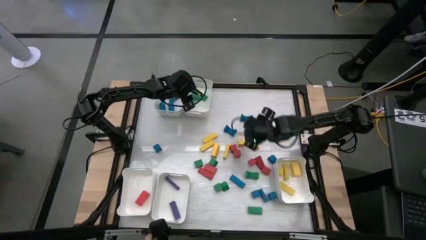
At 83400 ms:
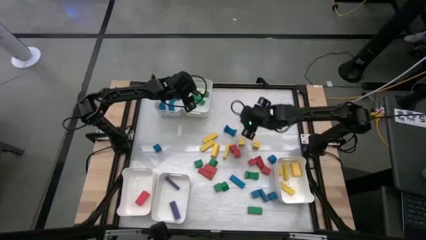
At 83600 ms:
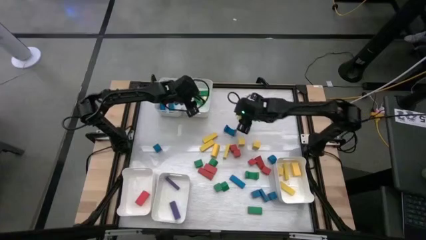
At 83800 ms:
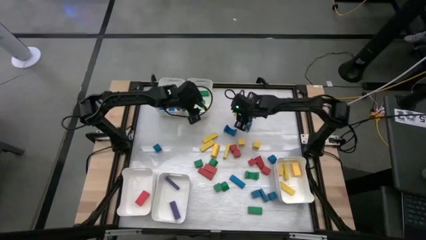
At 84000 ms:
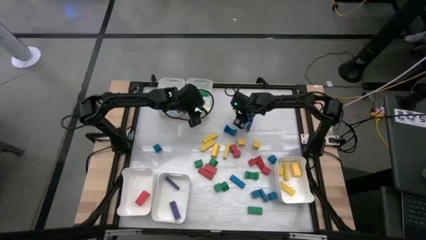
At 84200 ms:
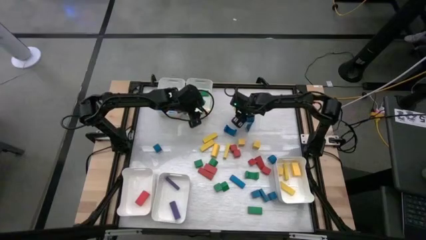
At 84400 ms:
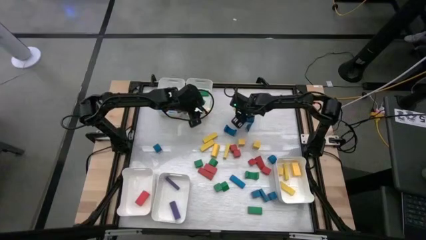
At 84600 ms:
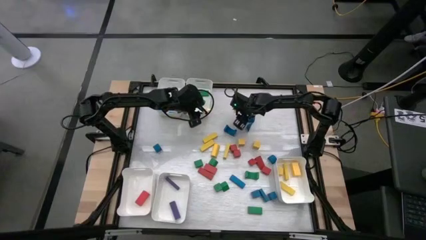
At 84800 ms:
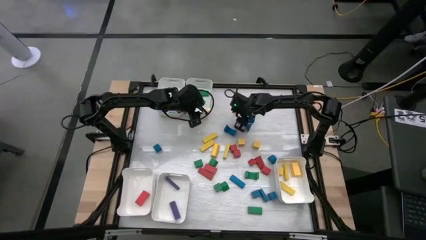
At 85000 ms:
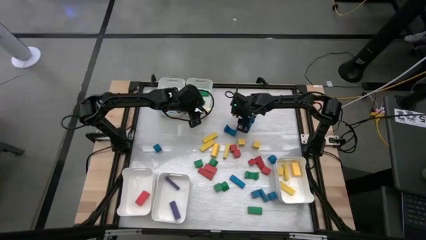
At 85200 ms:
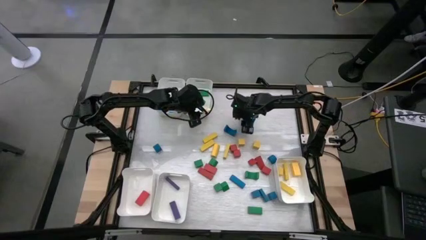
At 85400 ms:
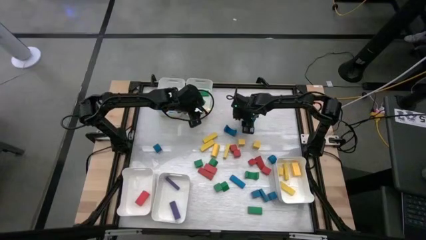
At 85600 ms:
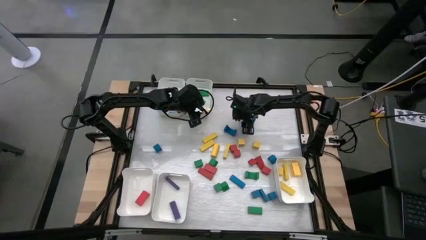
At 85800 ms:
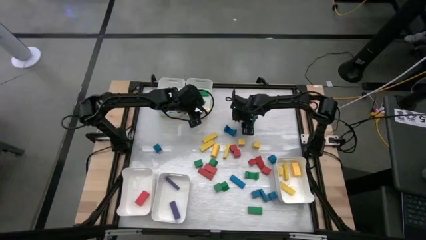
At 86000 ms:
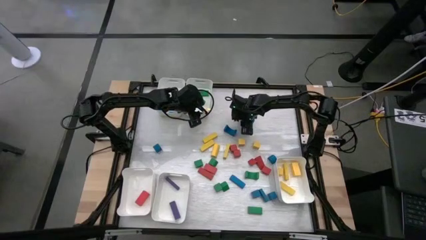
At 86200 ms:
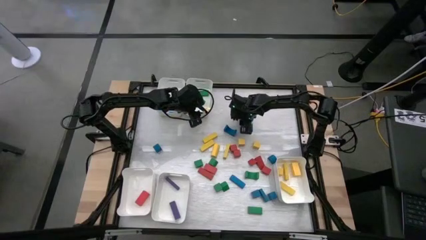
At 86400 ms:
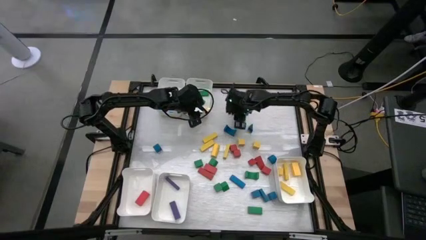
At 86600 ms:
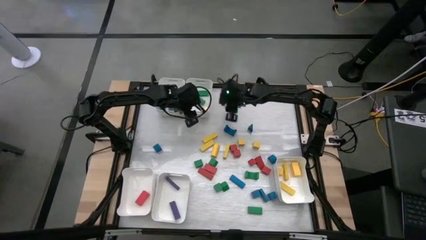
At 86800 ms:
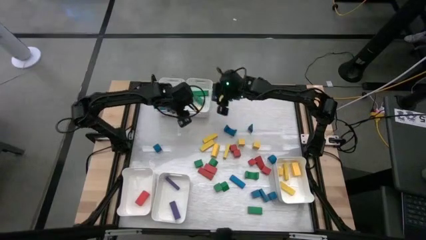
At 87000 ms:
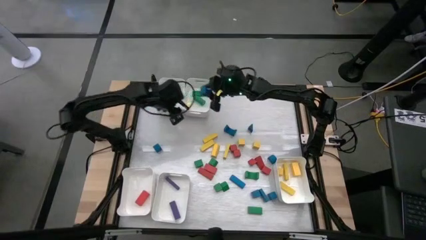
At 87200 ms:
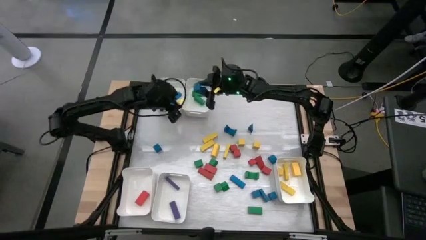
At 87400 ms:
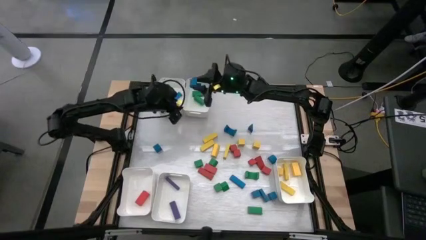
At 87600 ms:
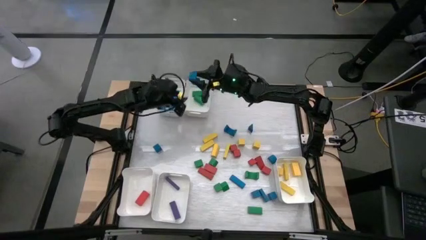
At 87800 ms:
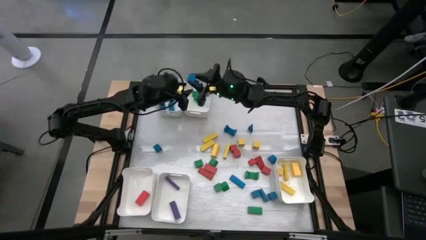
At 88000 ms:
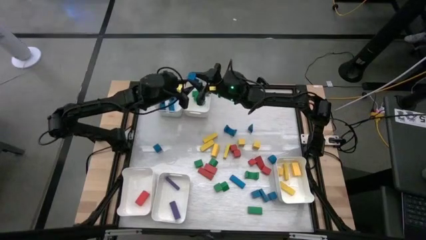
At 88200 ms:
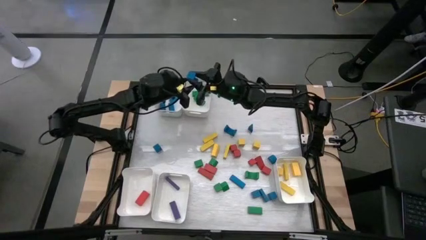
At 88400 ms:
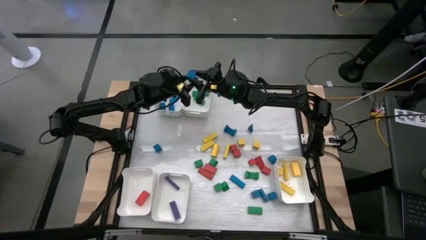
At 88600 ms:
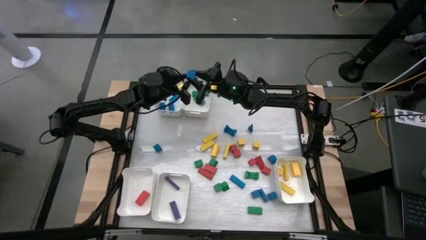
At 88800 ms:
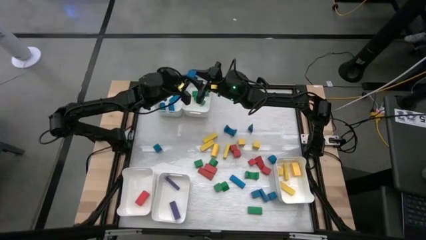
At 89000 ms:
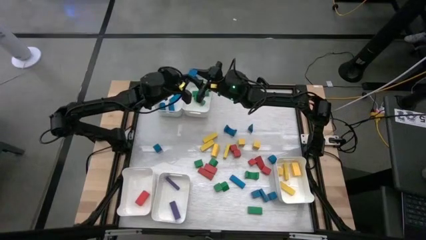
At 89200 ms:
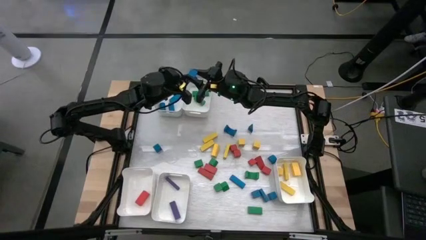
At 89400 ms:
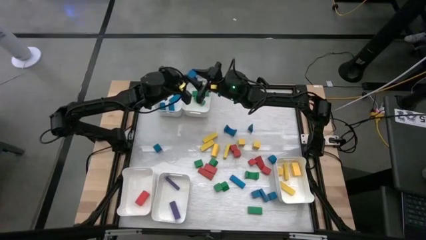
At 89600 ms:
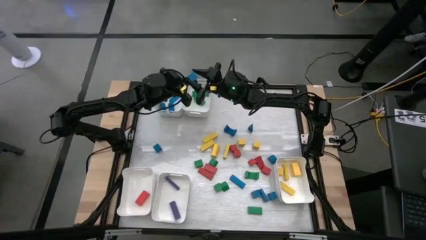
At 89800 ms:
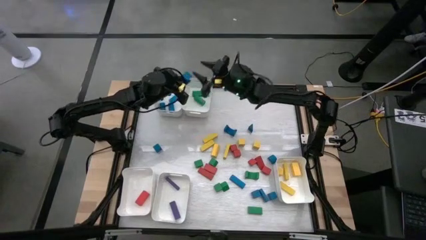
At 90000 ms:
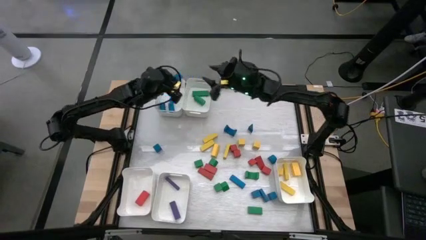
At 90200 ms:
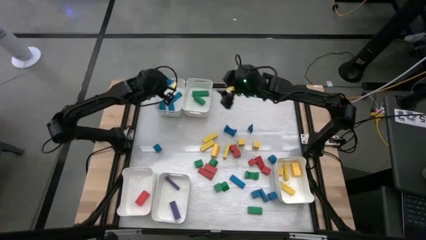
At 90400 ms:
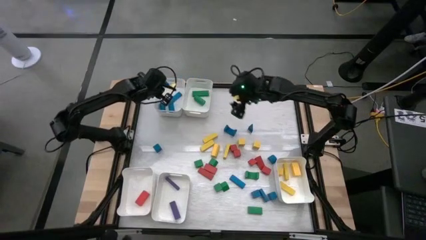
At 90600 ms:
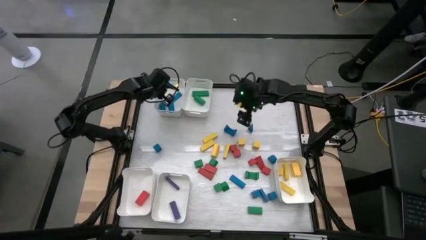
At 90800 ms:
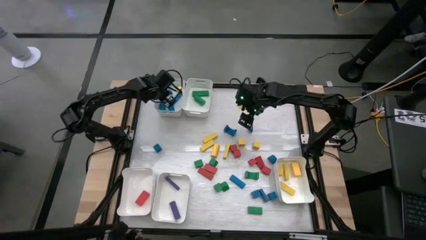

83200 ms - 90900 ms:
Task: Sort blocks
Put the blue block into the top left white bin

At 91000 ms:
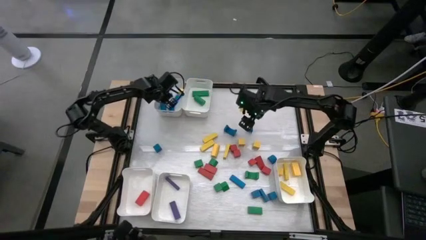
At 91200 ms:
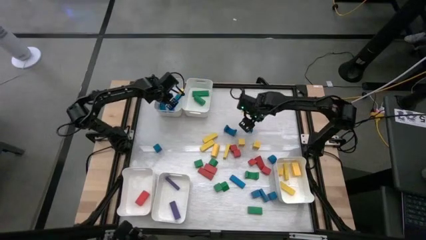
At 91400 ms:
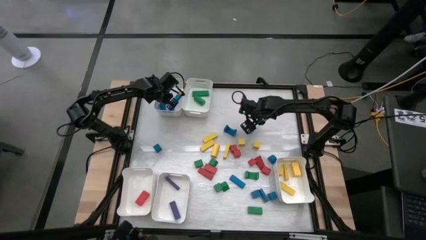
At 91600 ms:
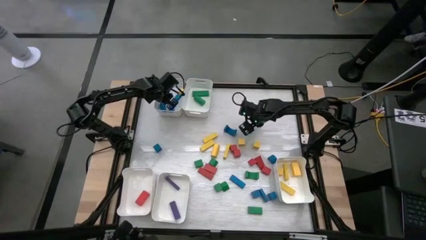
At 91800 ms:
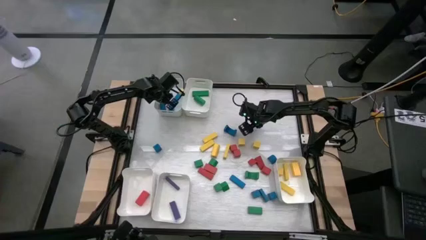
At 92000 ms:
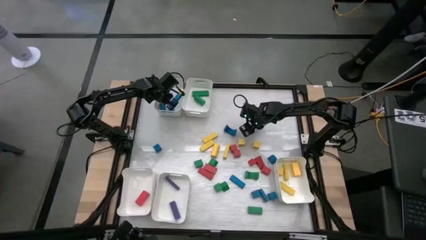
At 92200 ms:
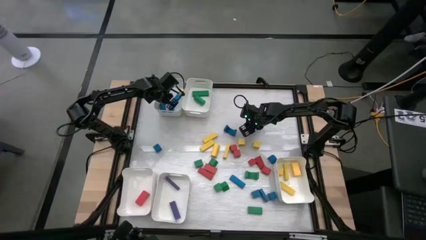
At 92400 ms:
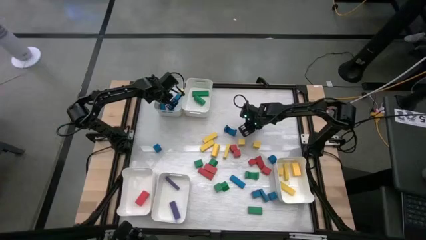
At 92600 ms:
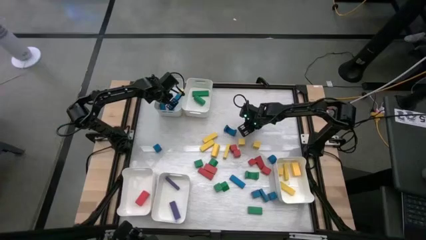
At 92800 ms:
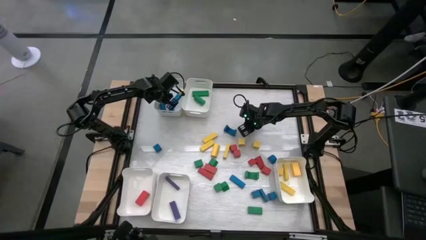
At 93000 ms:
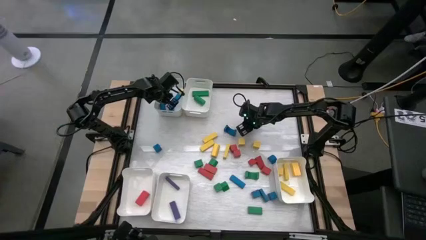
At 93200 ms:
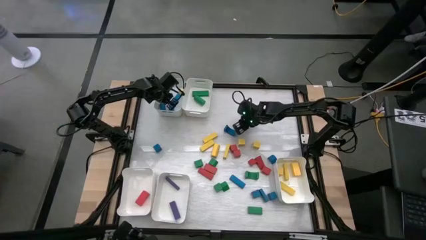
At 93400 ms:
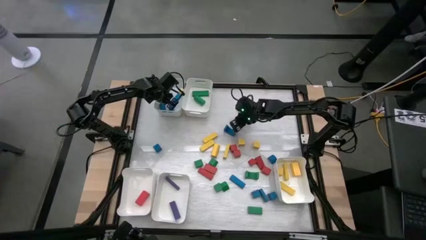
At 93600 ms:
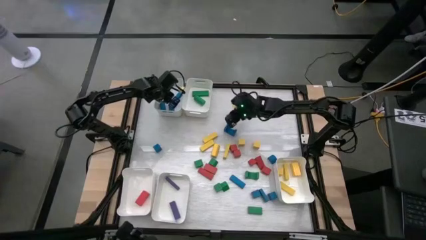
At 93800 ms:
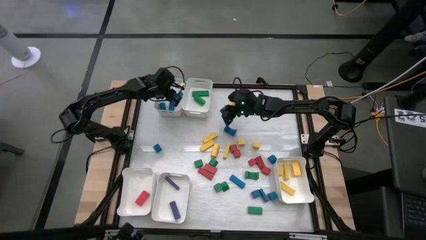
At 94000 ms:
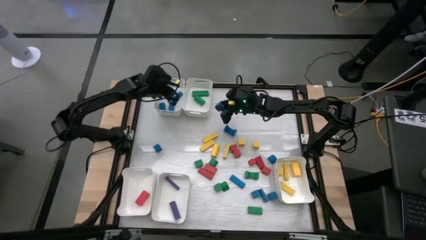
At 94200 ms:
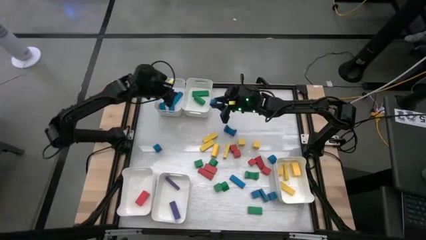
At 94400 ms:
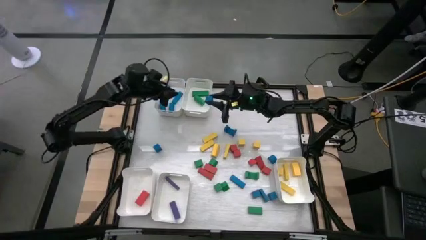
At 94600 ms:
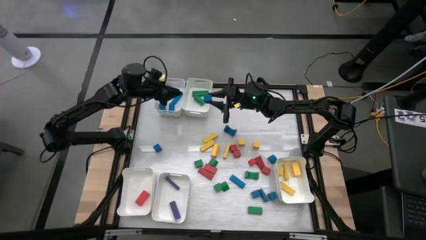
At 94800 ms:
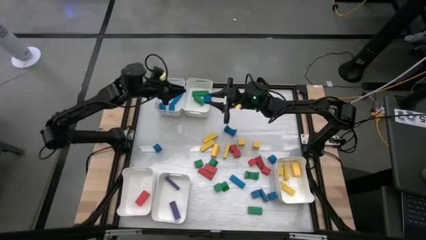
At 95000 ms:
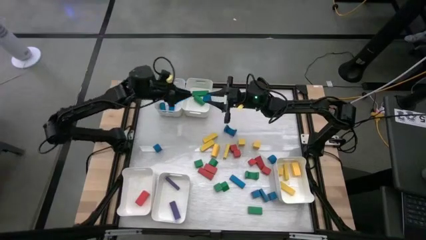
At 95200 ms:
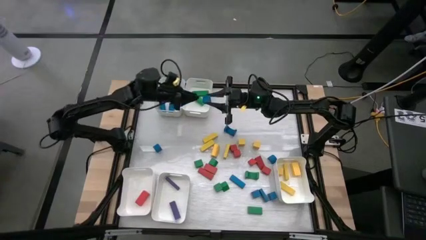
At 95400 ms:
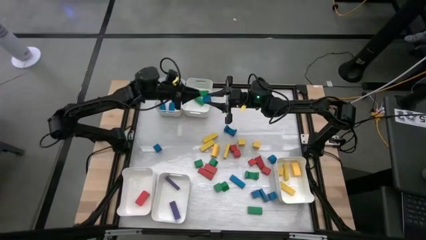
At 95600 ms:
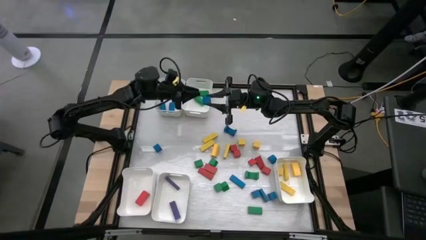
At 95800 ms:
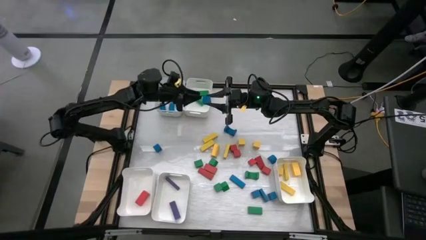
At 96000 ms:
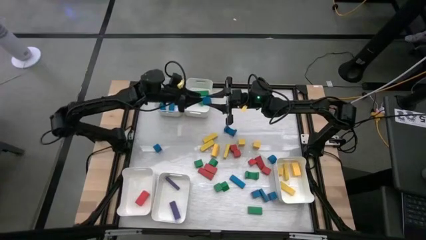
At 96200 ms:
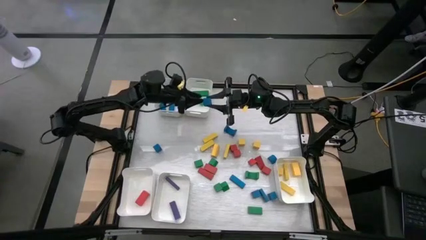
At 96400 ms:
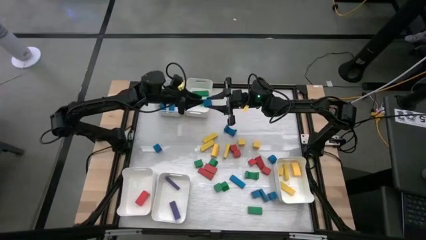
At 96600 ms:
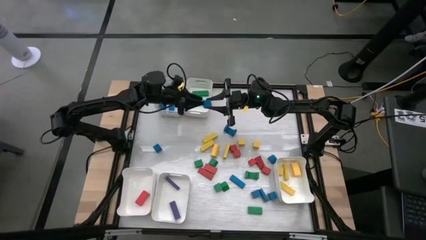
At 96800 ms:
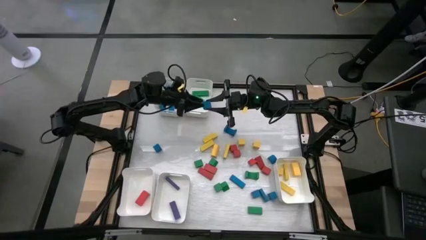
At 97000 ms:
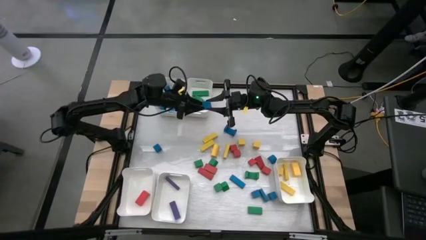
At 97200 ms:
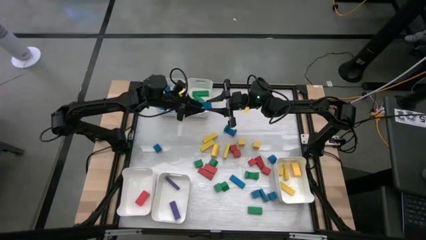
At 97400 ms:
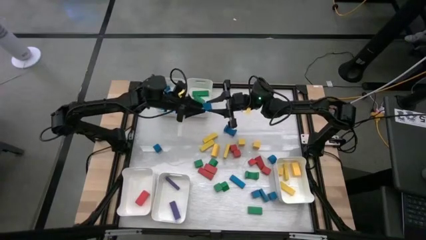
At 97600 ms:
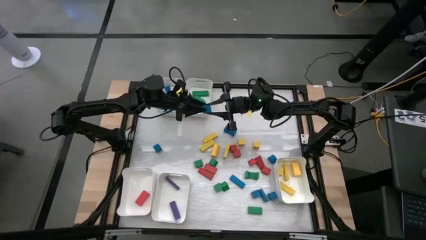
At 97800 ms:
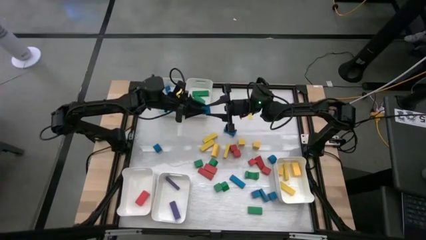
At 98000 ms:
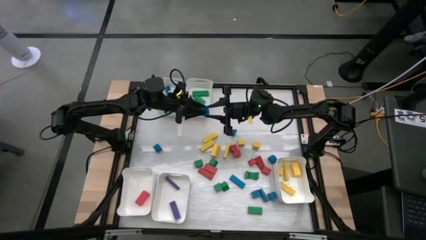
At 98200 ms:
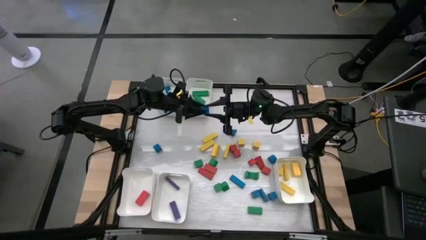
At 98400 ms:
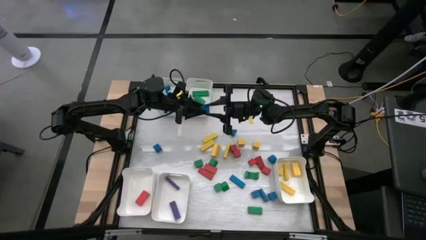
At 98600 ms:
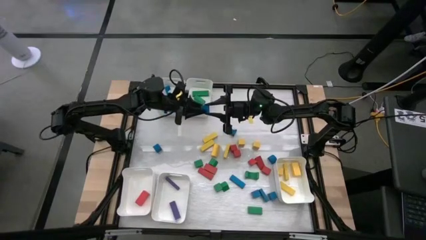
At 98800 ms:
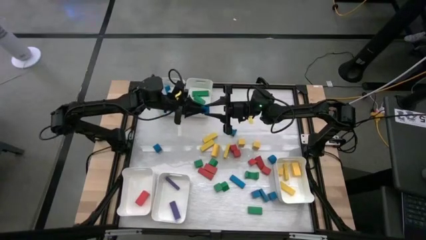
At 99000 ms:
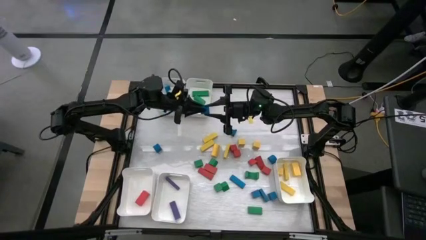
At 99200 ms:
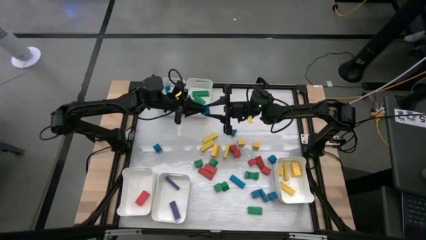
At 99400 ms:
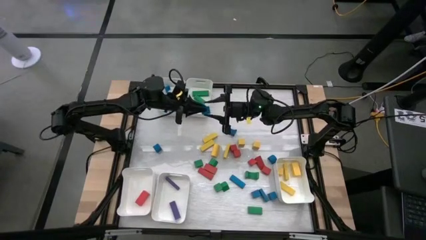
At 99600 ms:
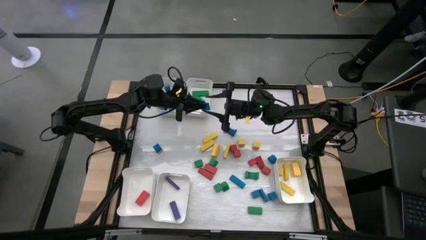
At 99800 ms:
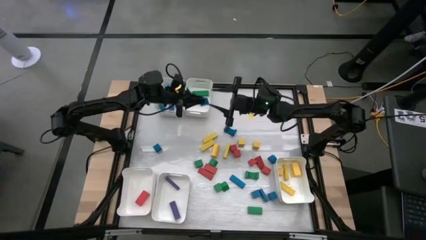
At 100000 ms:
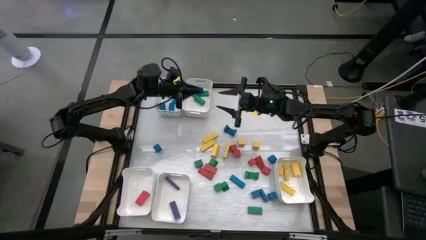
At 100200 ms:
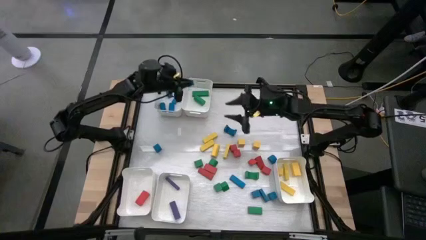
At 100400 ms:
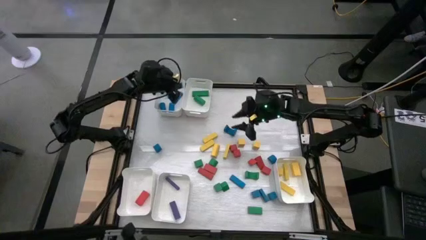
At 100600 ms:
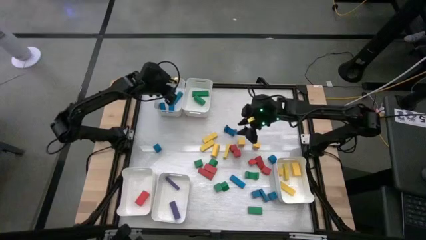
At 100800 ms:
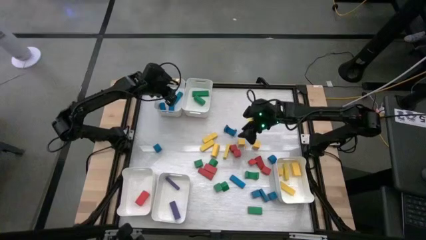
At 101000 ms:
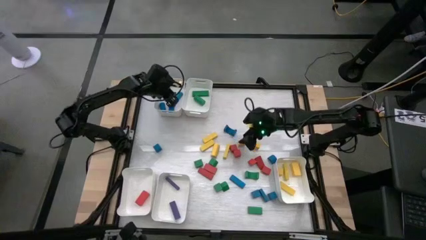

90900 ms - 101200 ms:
Put the blue block into the top left white bin
